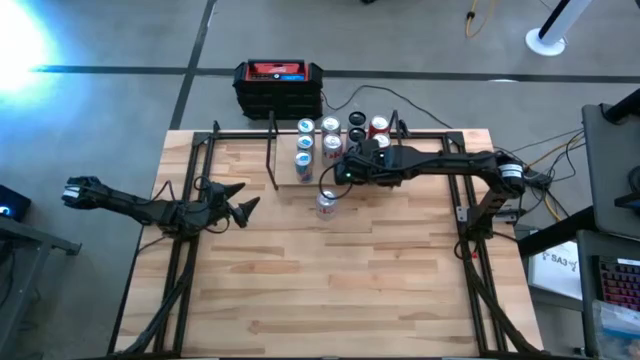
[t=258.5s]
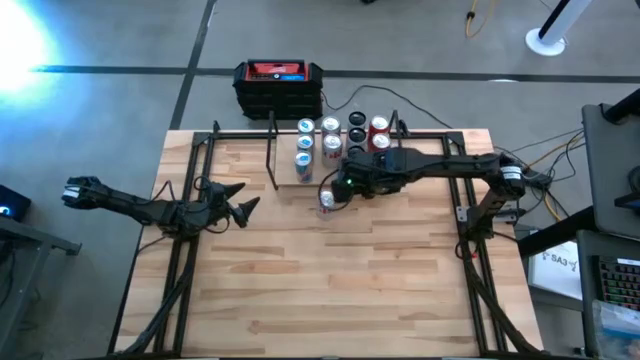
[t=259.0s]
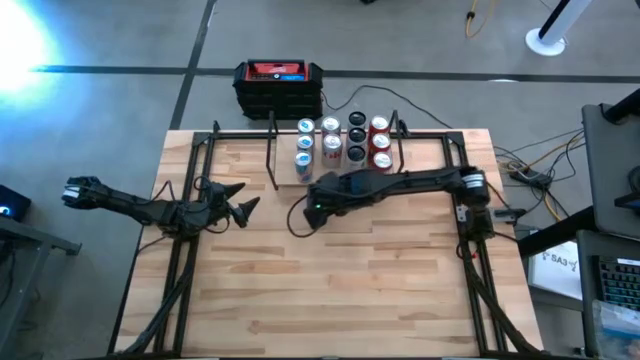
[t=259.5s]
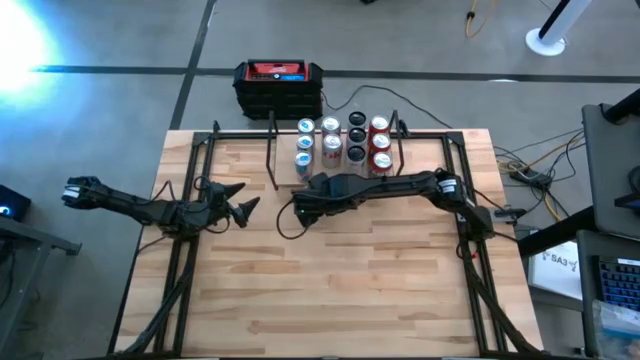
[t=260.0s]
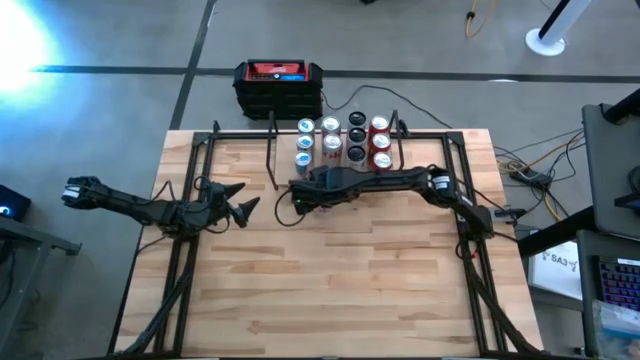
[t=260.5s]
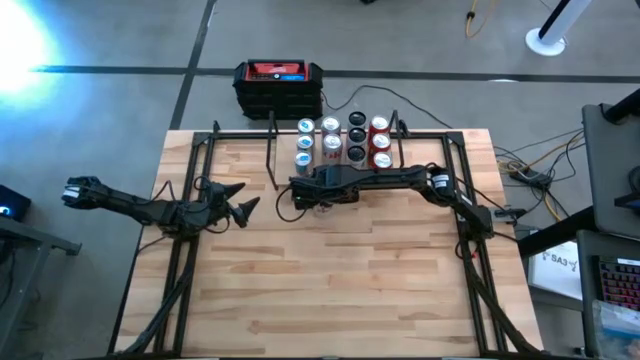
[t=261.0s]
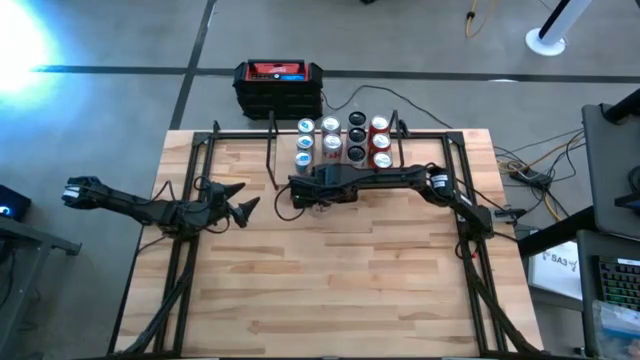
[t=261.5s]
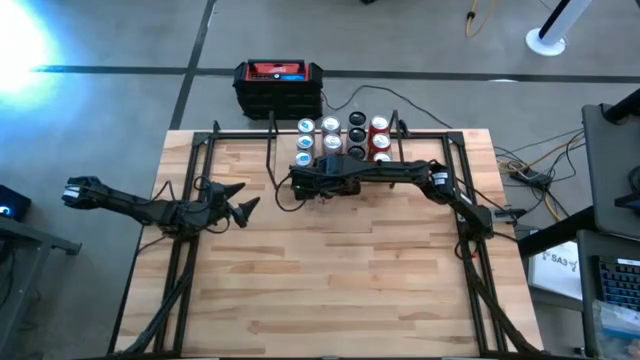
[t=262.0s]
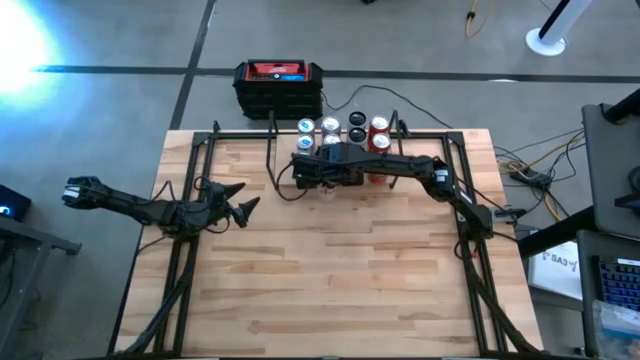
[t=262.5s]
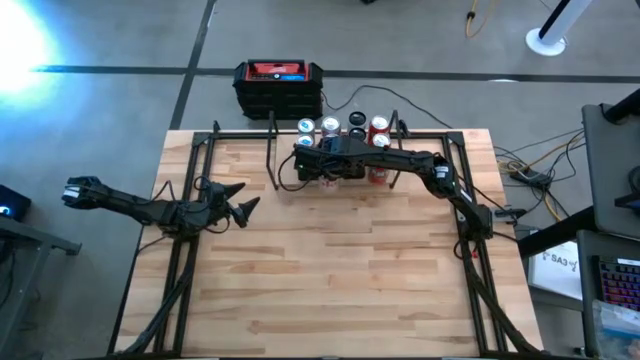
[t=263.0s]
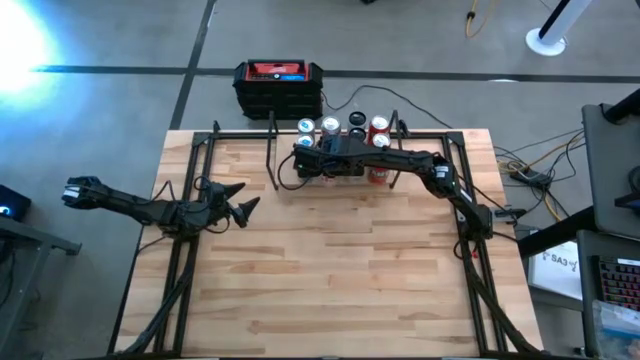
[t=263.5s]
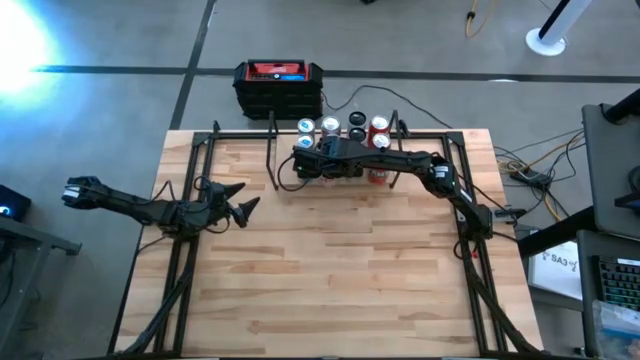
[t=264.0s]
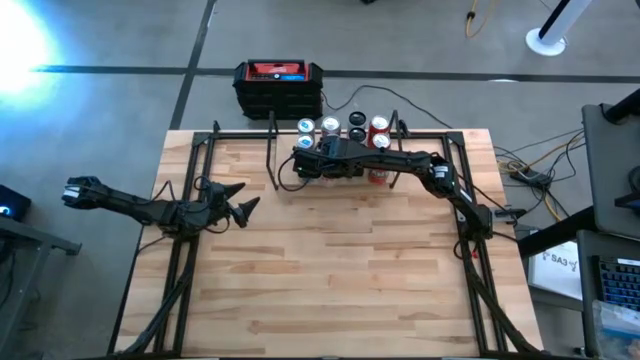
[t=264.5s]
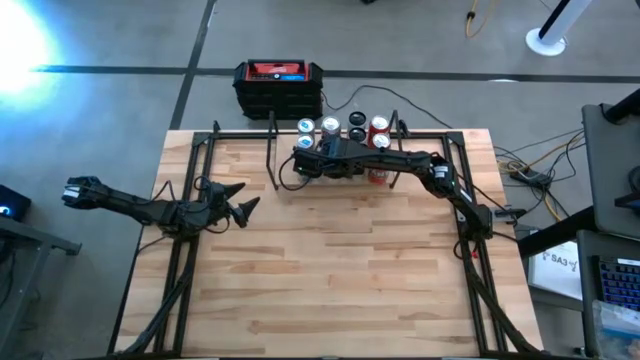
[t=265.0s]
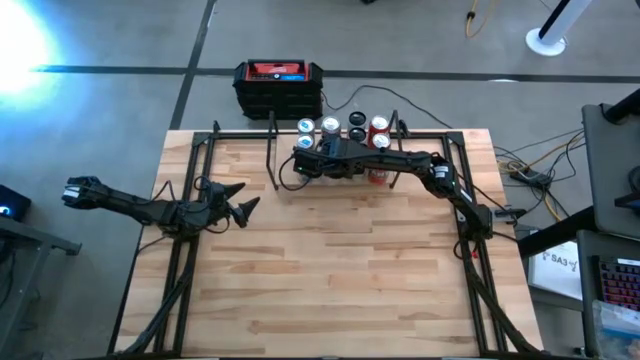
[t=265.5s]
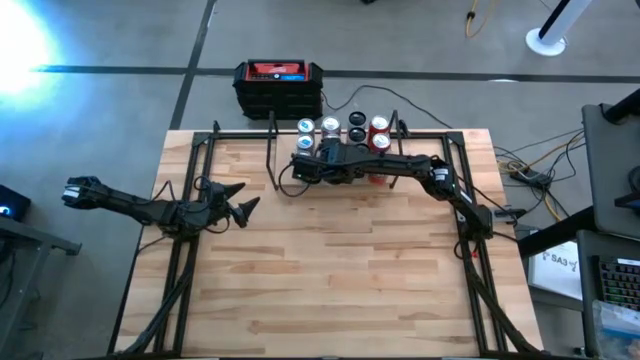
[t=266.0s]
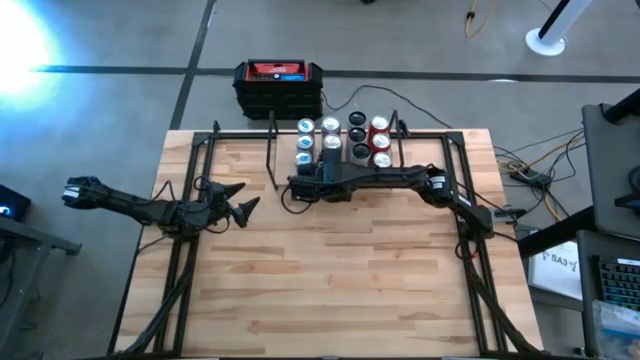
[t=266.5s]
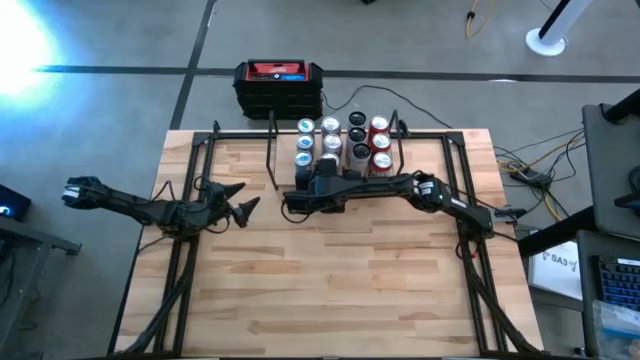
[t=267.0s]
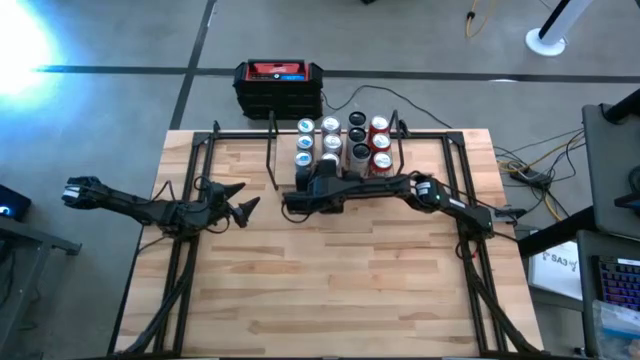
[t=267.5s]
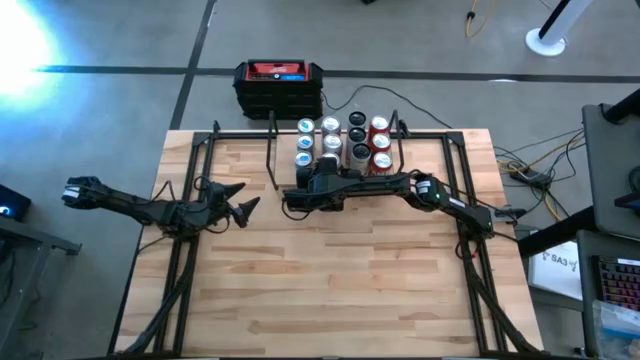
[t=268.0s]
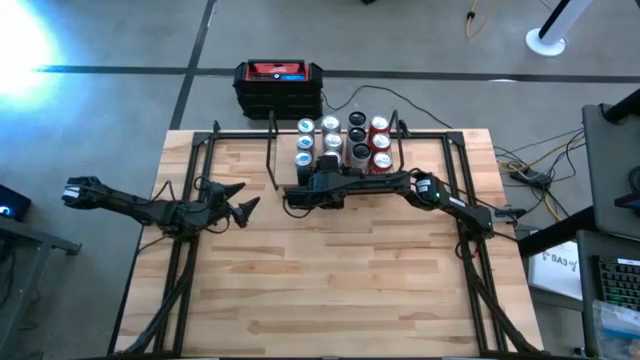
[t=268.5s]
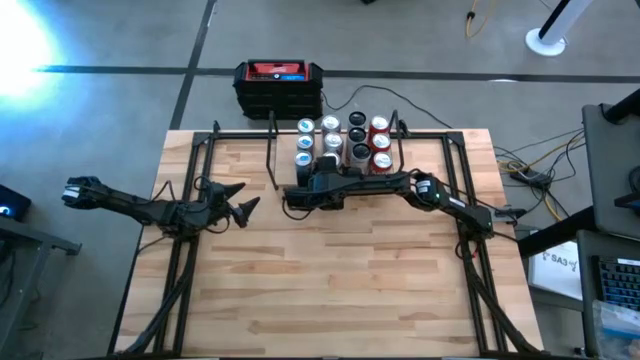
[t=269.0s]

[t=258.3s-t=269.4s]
Task: Place canned beverage on shelf
Put the silver soda can on the shelf aligned with the other silver soda can

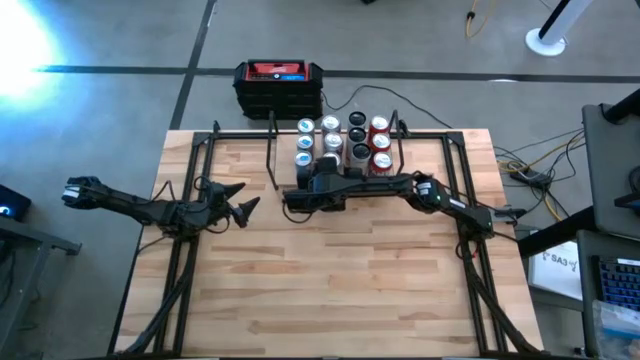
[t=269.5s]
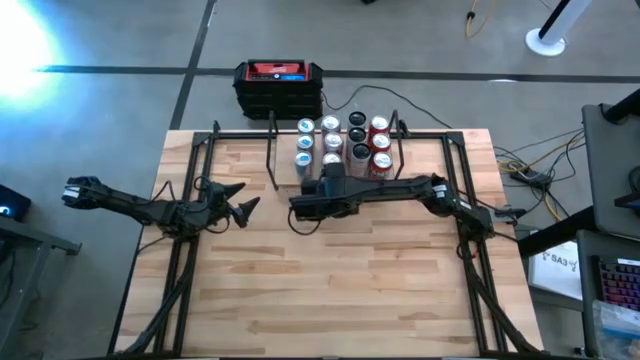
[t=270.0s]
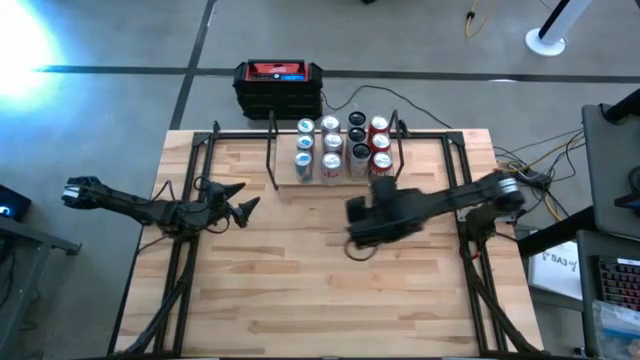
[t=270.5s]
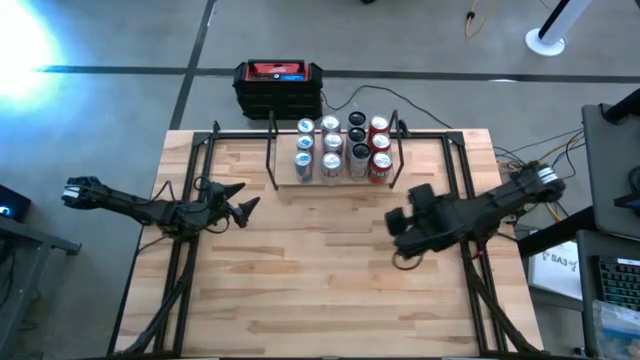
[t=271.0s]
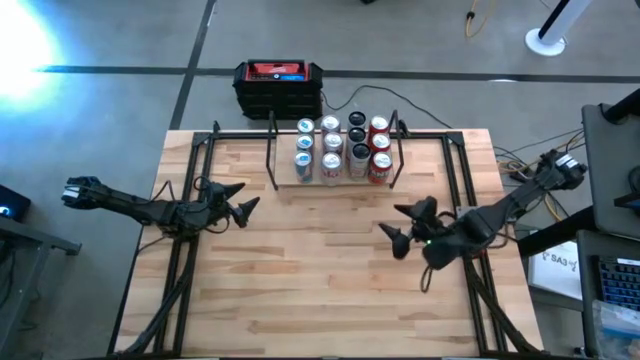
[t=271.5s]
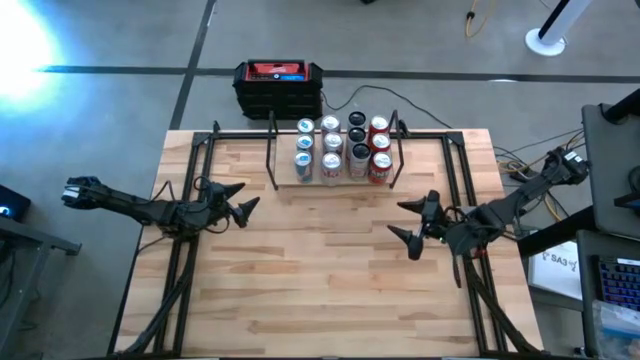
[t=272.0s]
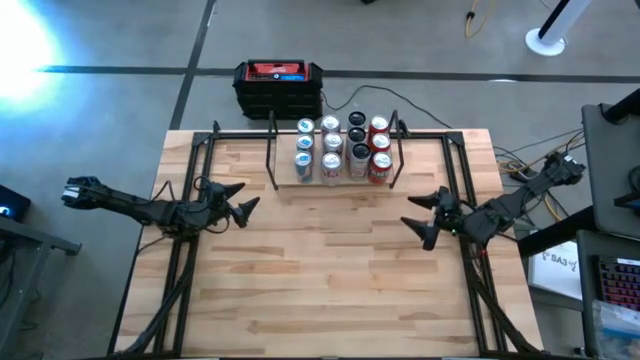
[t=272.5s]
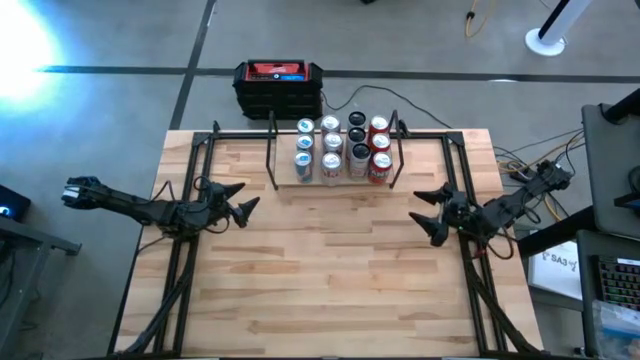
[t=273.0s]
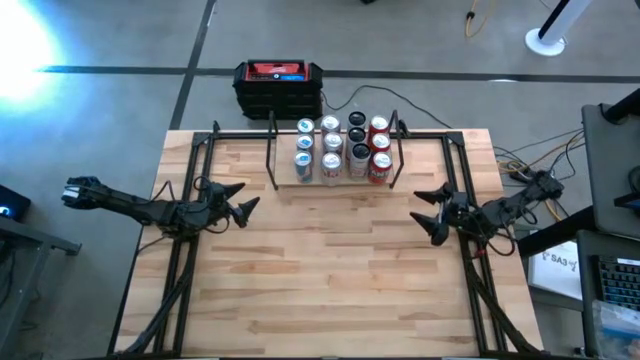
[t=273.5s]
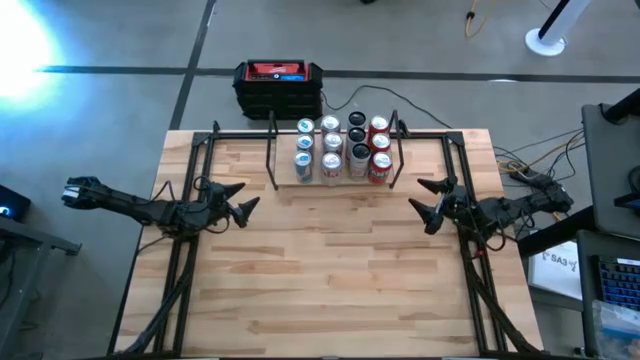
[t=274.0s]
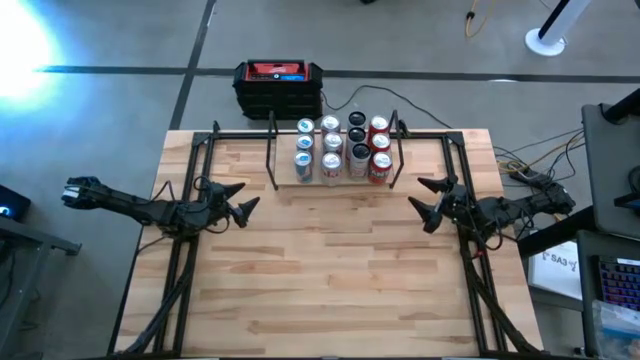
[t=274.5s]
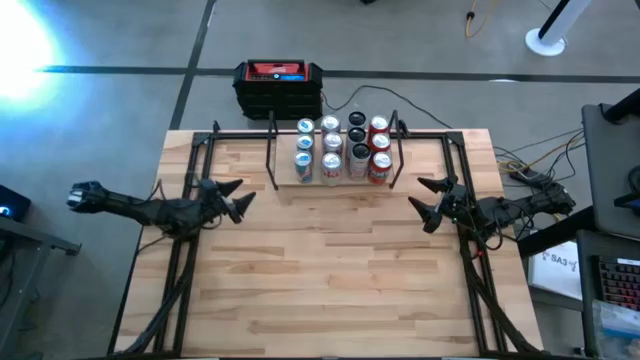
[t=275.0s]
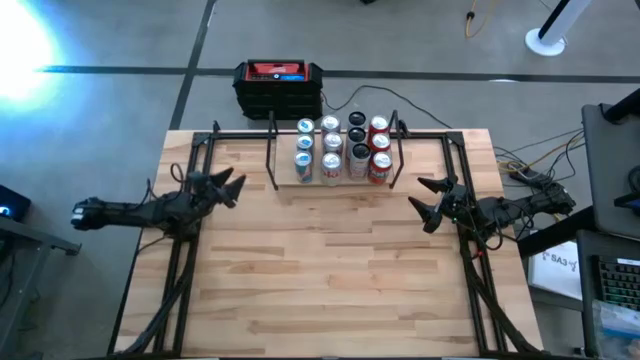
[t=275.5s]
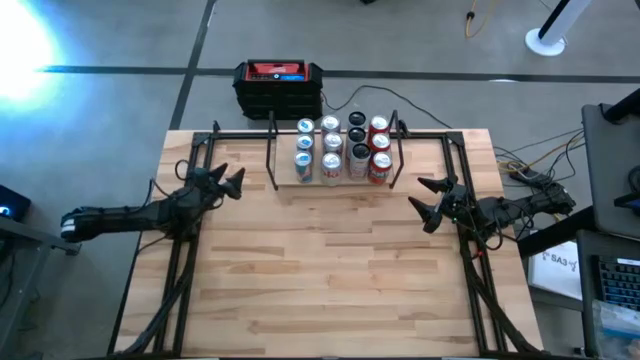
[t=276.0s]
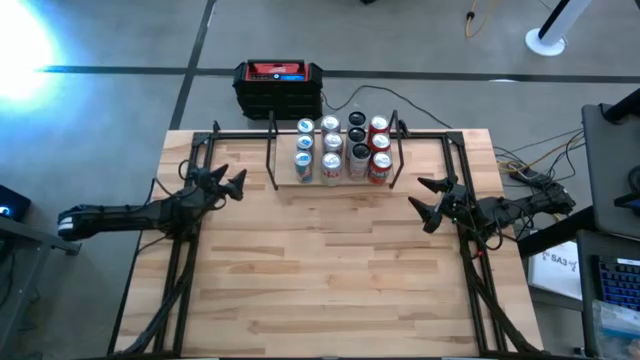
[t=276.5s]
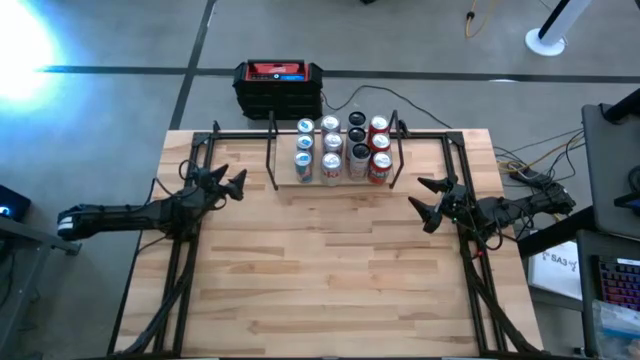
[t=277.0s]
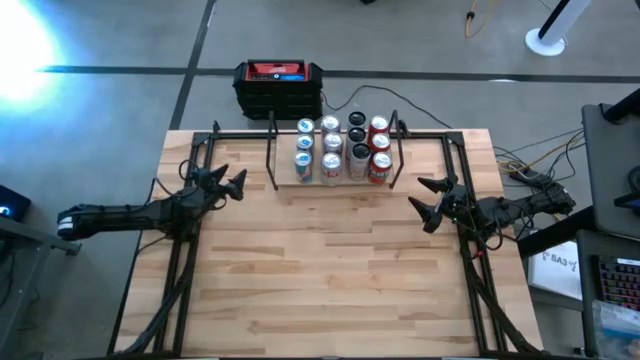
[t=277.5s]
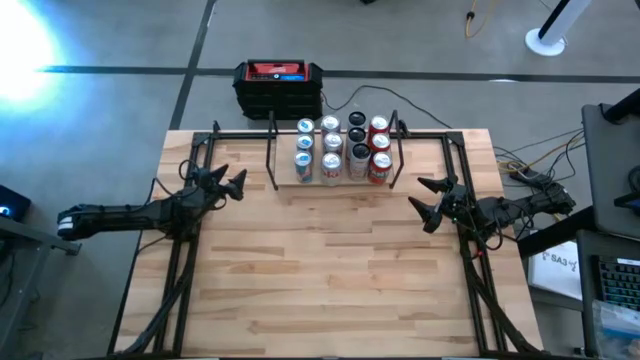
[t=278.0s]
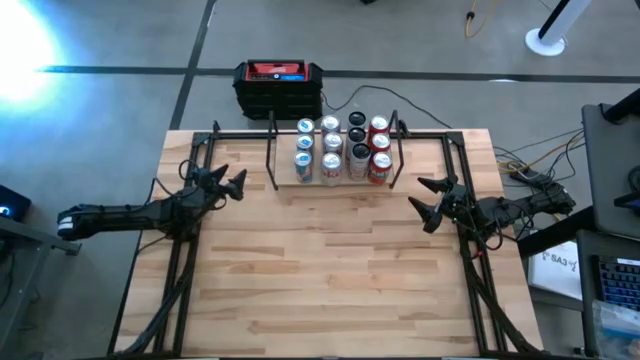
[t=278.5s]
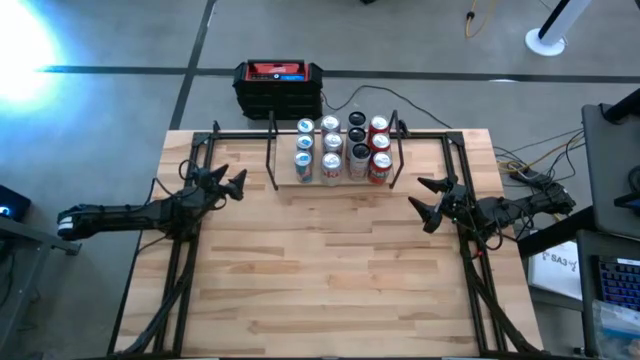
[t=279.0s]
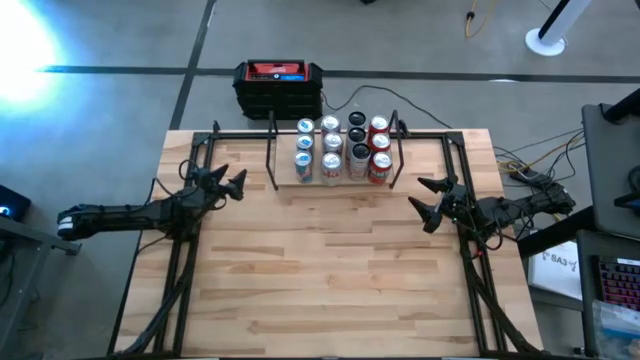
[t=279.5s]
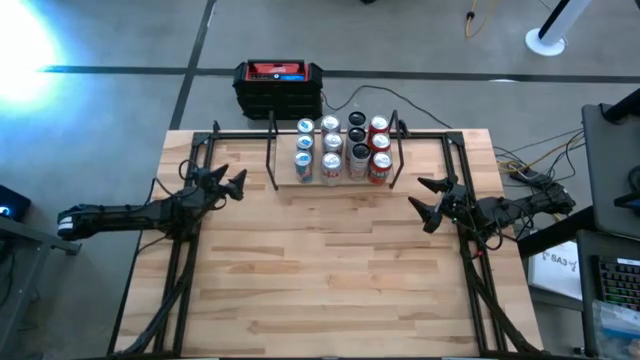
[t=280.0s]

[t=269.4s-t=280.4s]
Return to Home Position
